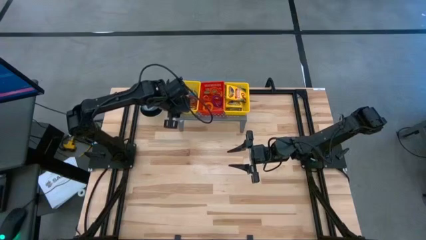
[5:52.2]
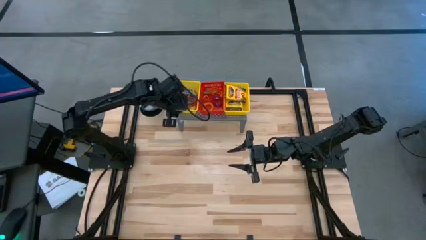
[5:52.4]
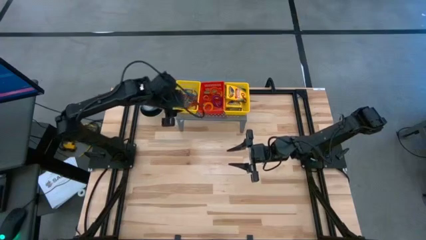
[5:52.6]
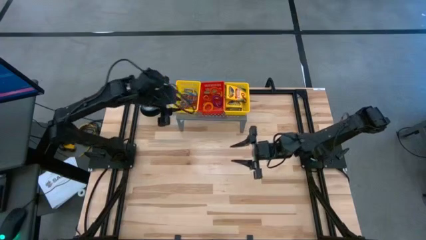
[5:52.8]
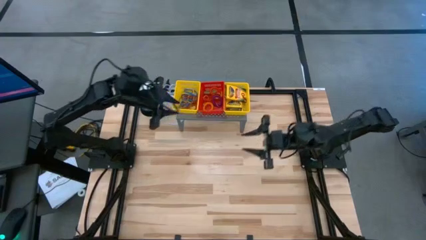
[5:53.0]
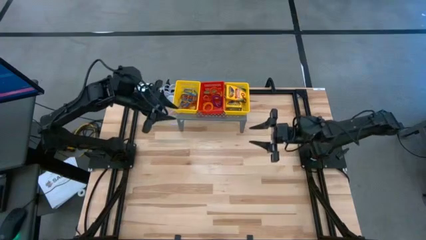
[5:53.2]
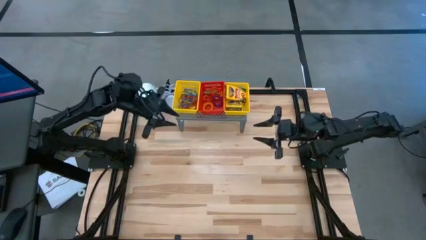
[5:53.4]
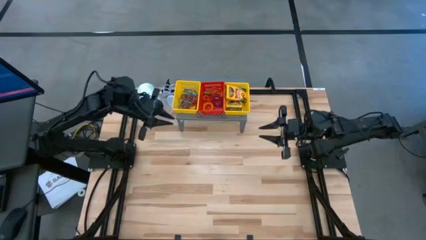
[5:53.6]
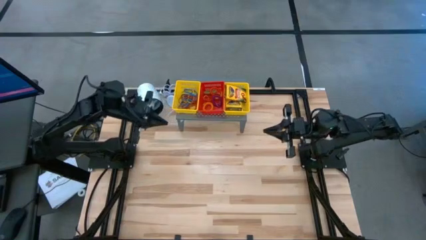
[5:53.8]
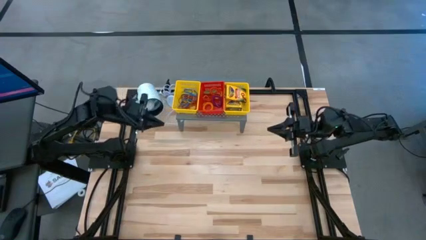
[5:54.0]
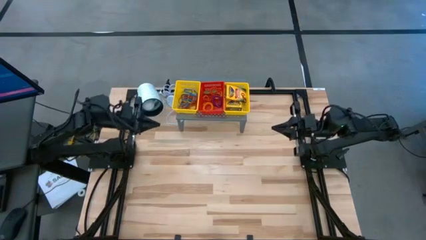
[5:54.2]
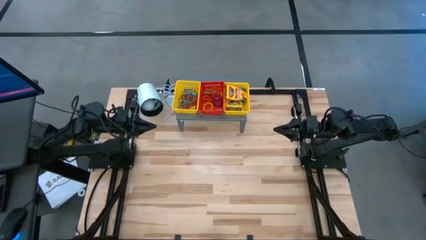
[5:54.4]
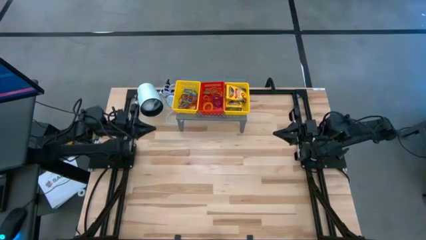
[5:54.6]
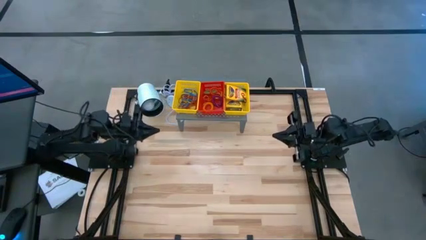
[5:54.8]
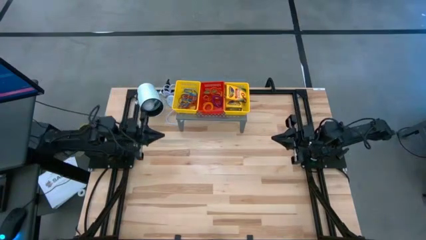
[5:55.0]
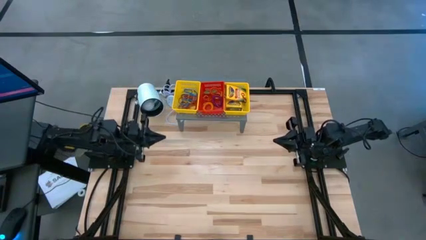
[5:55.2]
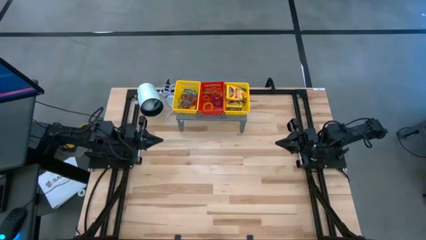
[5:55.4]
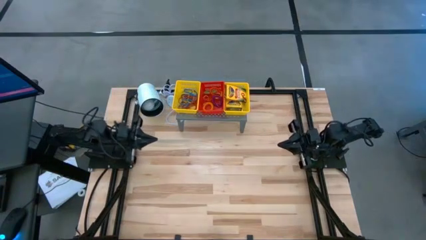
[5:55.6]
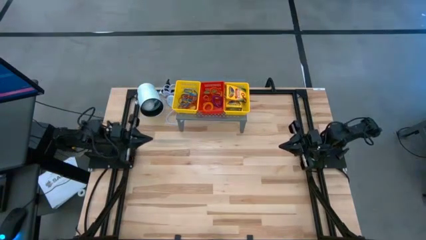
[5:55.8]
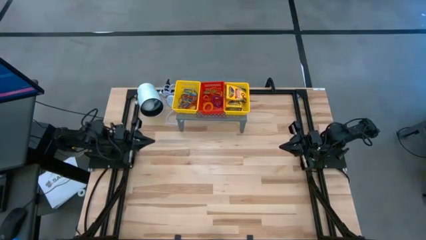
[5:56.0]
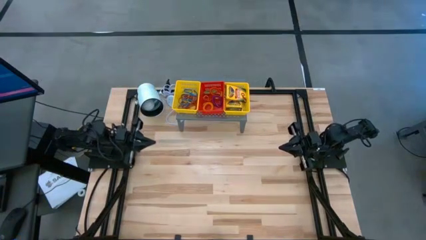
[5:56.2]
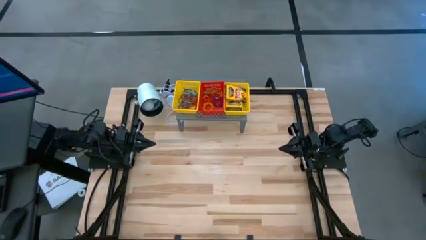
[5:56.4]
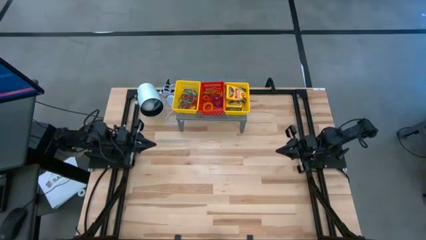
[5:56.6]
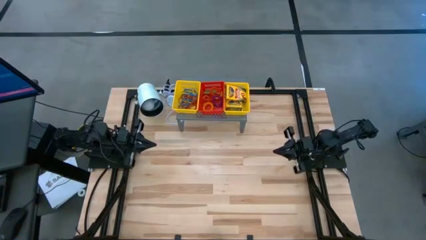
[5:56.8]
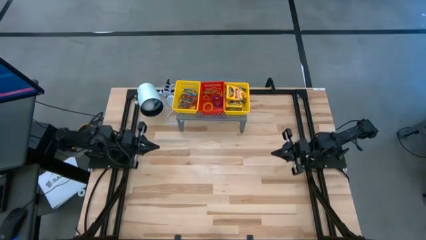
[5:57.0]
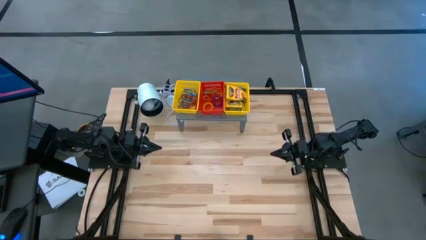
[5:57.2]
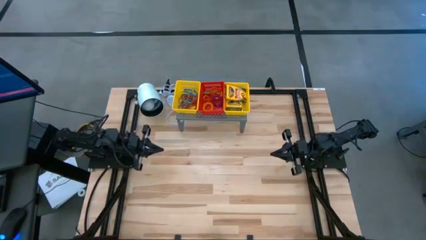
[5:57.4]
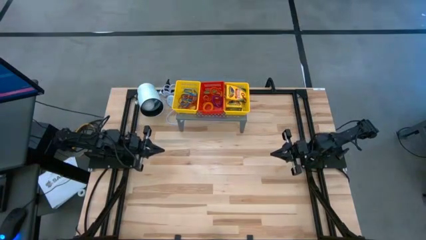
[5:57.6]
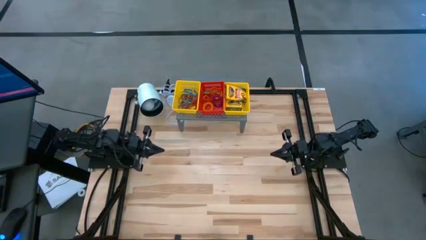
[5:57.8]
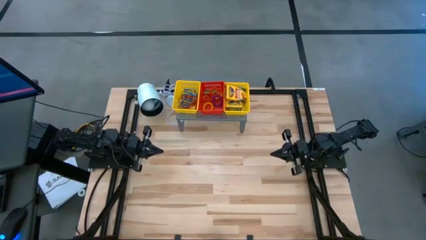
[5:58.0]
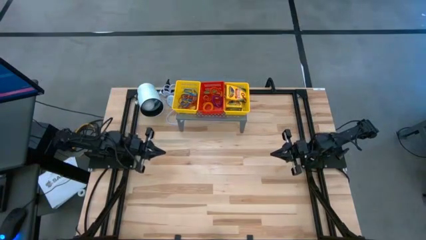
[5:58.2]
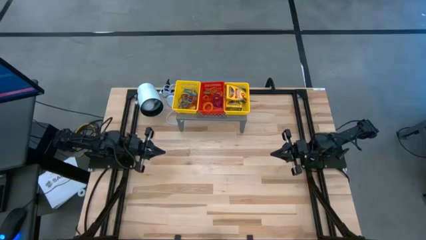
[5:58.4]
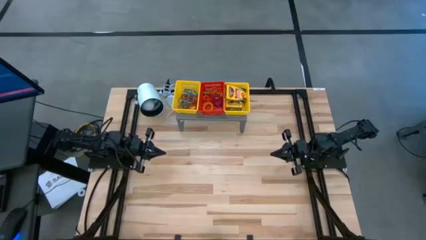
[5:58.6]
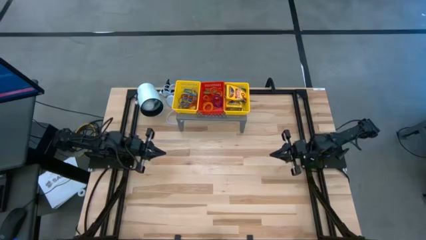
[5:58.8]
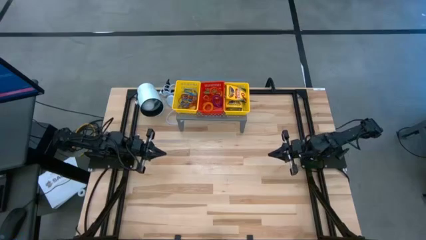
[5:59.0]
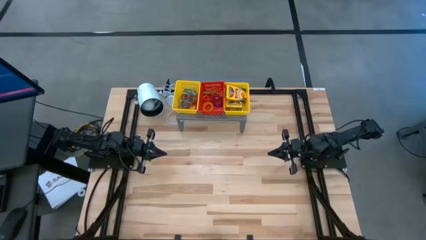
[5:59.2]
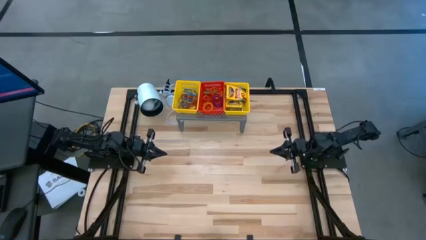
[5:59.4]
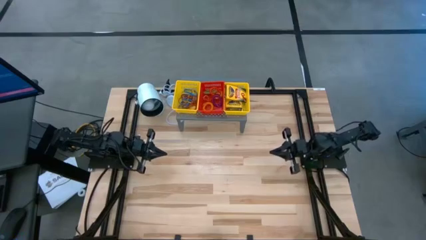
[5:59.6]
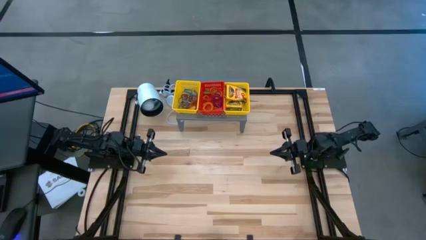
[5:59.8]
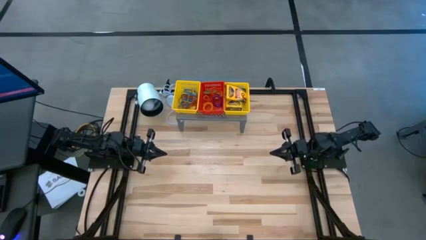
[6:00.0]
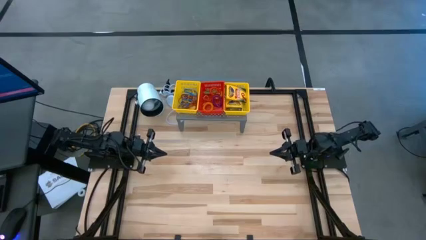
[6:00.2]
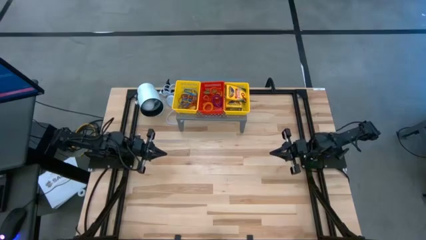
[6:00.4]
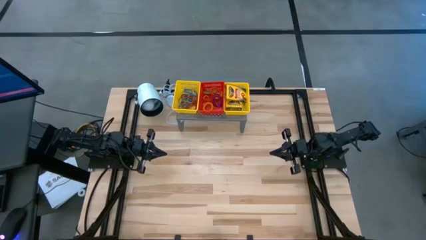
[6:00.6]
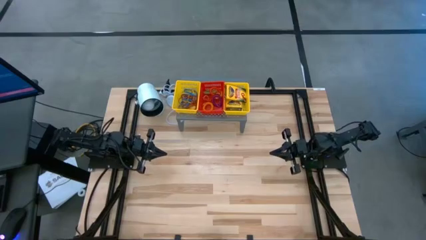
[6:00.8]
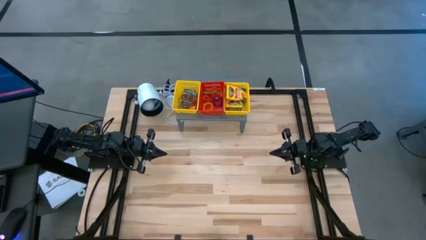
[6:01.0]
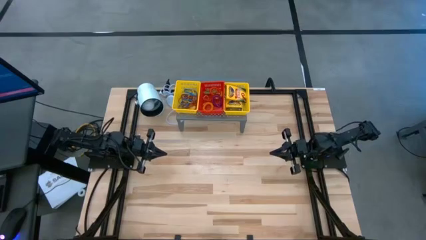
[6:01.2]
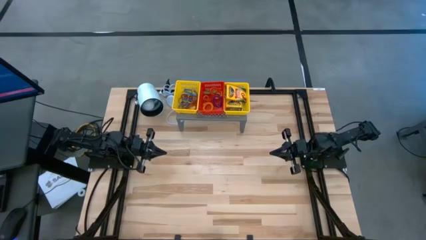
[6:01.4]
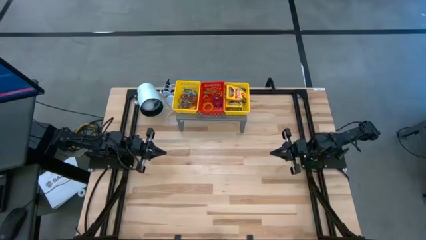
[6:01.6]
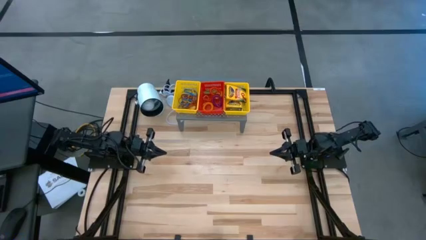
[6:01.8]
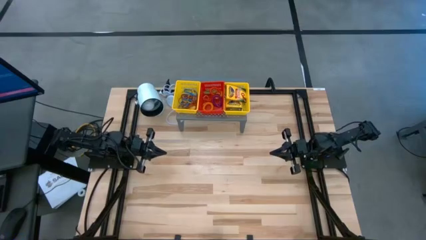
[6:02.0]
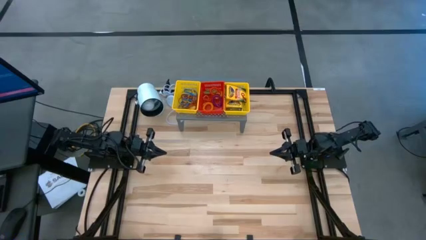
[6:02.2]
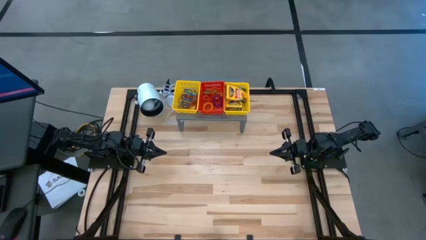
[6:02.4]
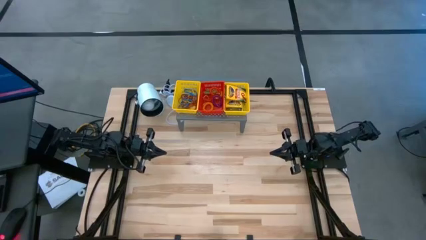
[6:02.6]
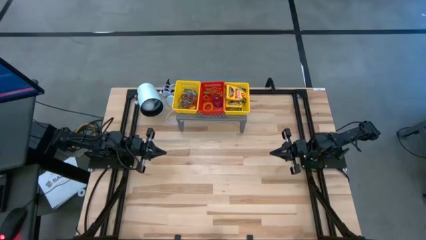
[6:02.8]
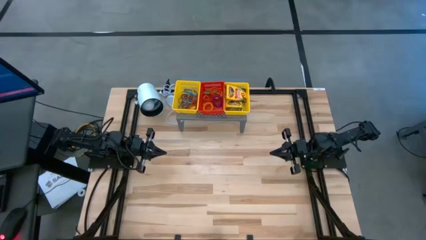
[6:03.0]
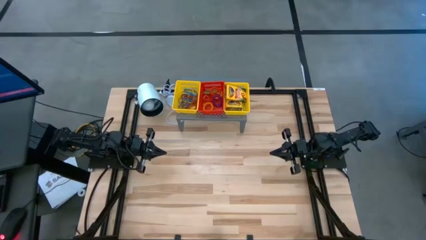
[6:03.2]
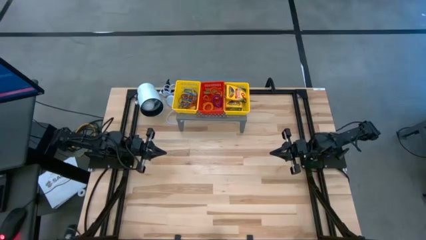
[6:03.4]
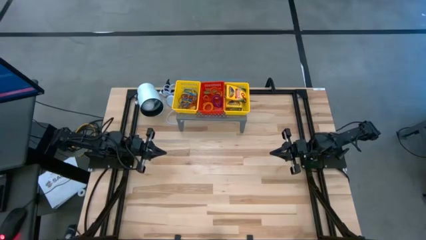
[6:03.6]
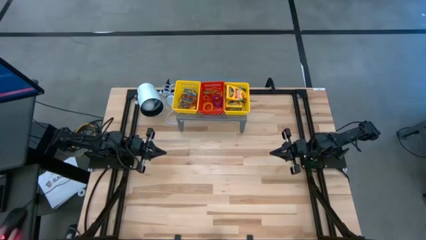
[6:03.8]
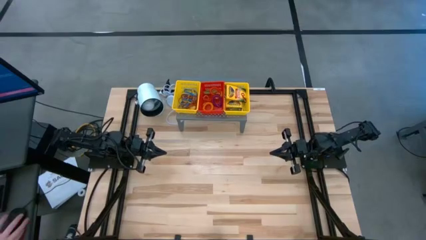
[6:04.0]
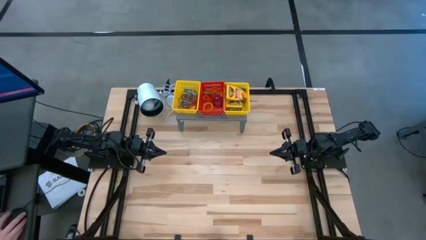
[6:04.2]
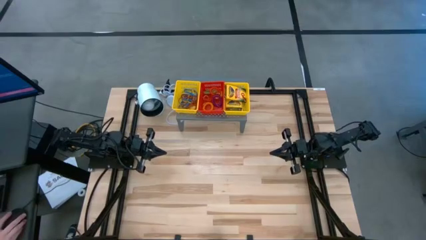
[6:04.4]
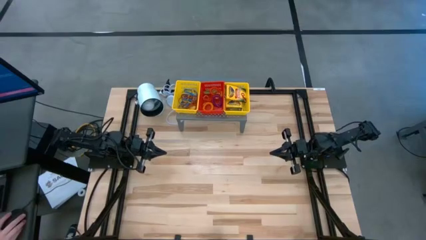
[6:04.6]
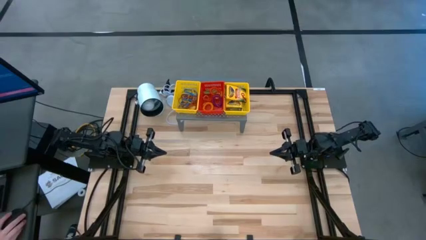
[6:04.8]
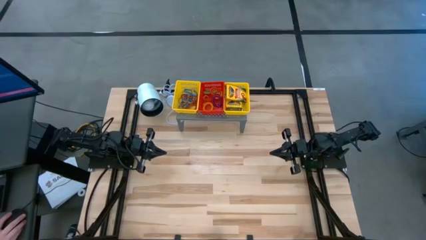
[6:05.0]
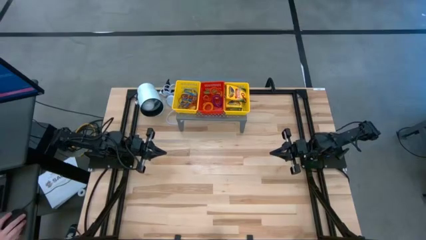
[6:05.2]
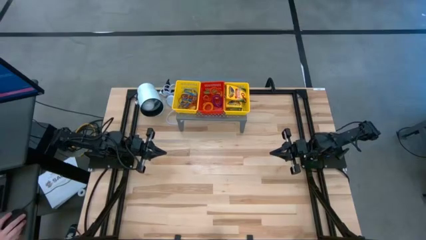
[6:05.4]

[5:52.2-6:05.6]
Task: Pick & Place Office Desk Supplies
Return to Home Position

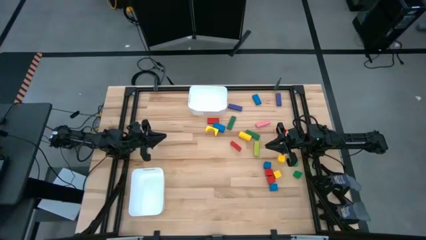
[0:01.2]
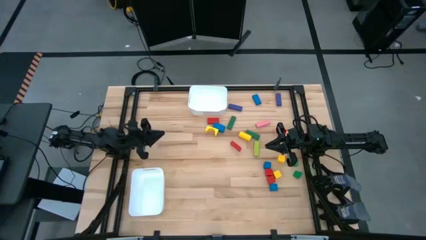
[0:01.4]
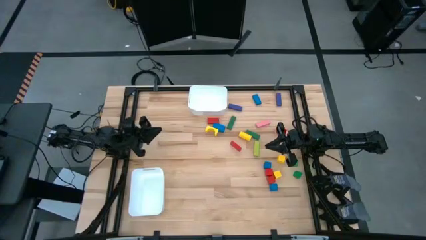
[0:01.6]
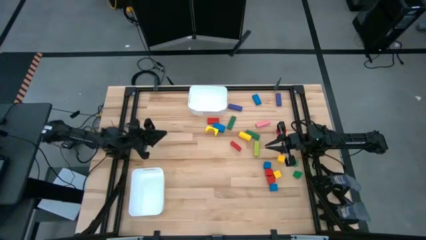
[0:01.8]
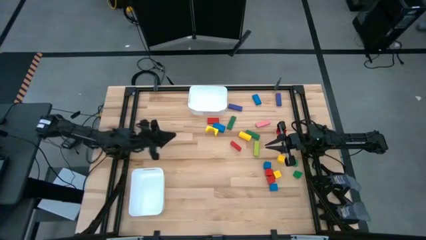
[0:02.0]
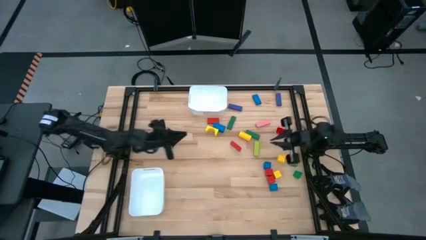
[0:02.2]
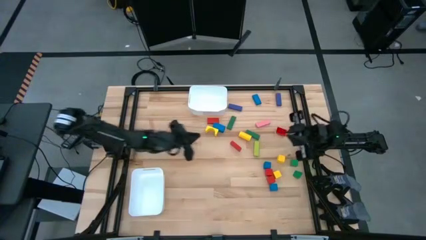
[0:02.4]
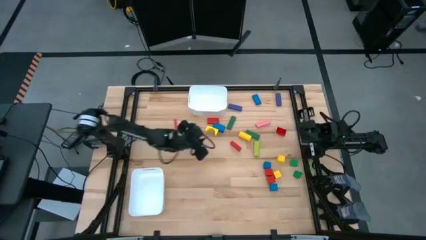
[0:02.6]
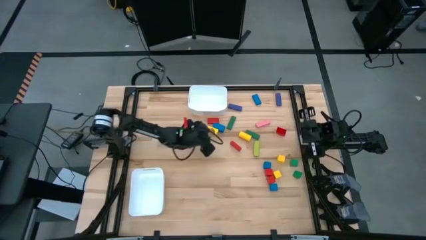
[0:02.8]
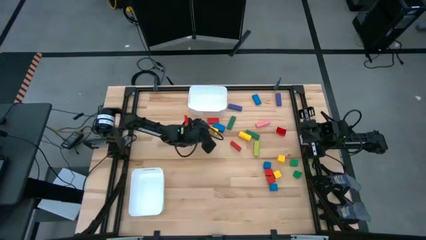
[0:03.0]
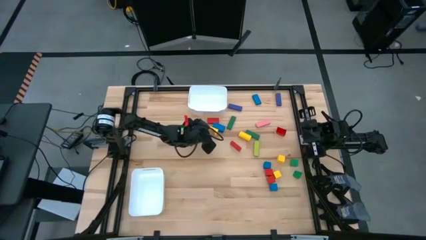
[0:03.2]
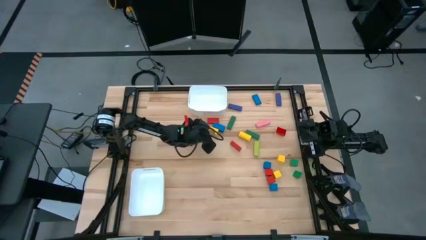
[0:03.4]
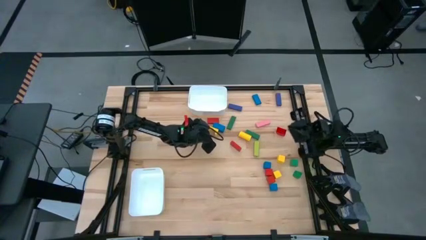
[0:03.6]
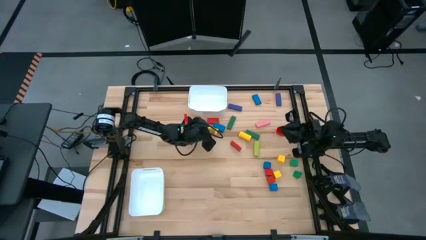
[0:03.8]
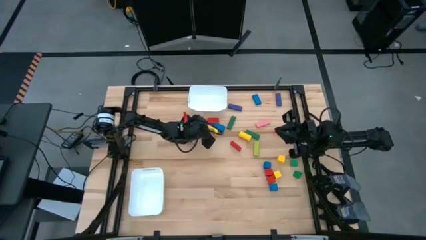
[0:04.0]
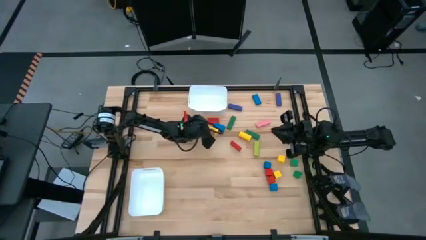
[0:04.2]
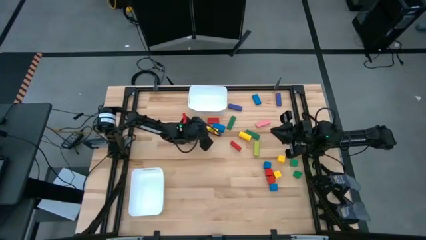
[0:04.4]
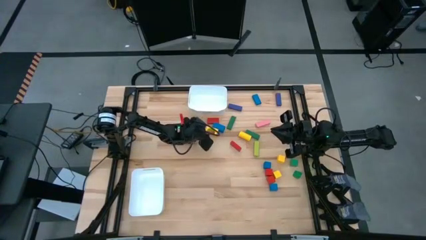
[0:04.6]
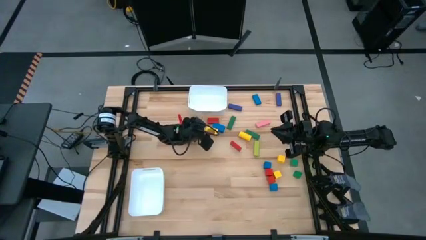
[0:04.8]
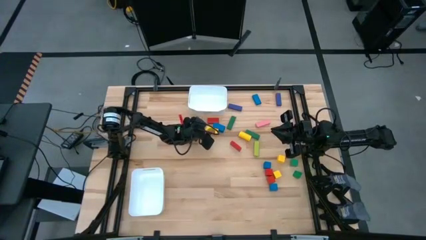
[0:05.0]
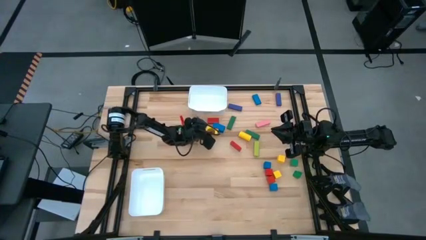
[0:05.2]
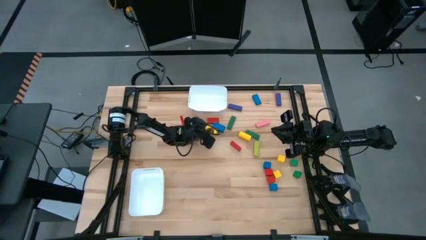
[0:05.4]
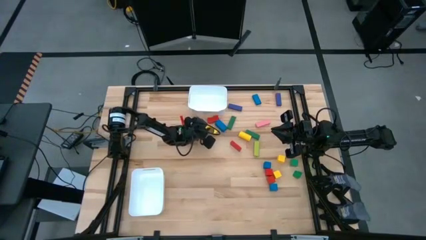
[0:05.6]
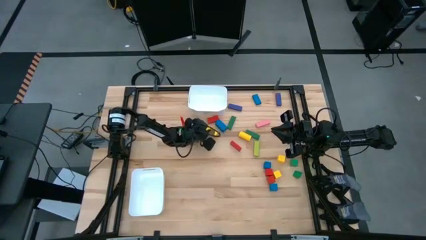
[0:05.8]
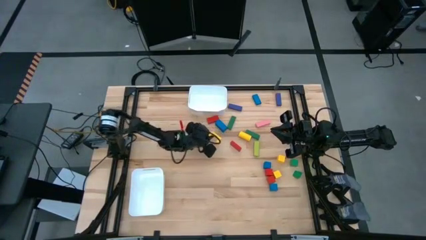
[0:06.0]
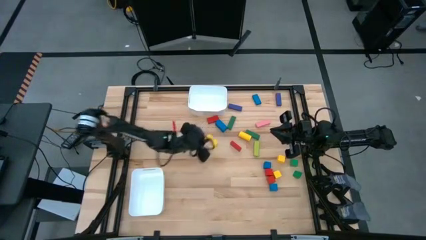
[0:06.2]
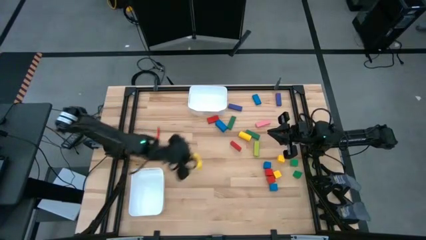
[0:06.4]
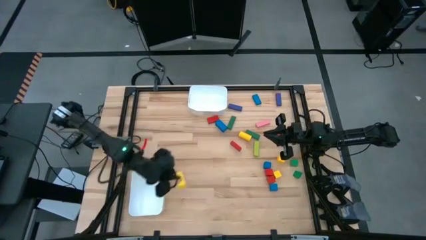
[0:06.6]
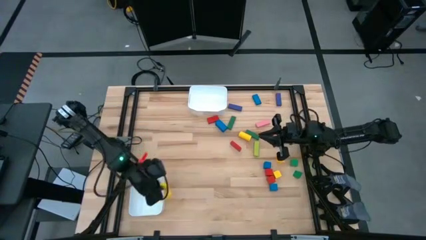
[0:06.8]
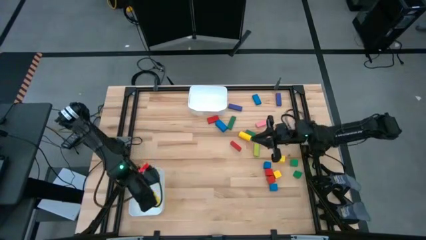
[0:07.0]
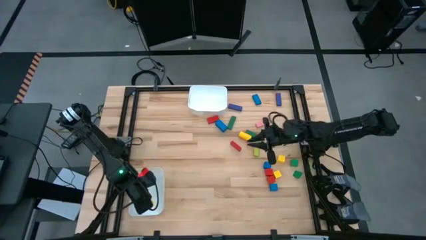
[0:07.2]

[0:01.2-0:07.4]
Task: Sort blocks by size
Put the yellow arch block into the bottom white bin
